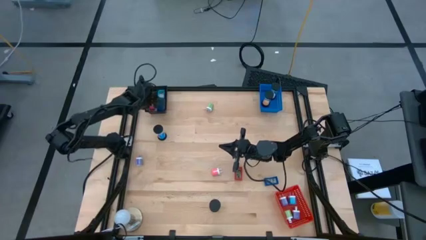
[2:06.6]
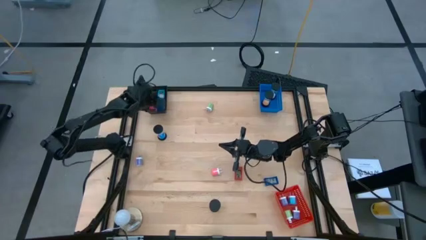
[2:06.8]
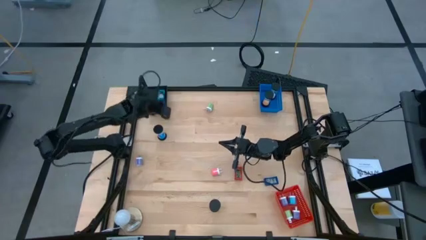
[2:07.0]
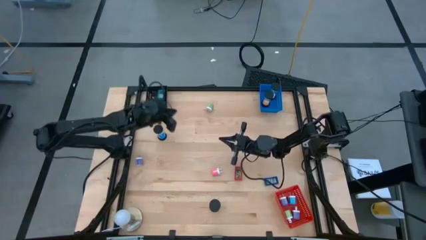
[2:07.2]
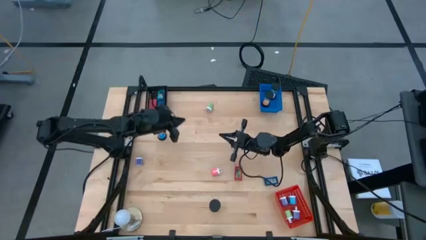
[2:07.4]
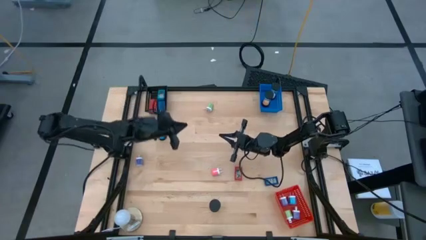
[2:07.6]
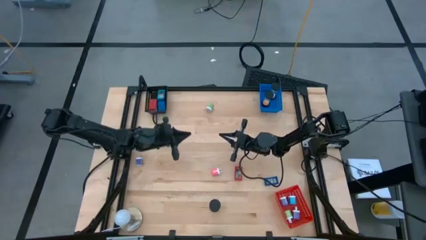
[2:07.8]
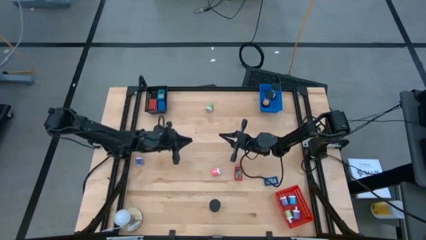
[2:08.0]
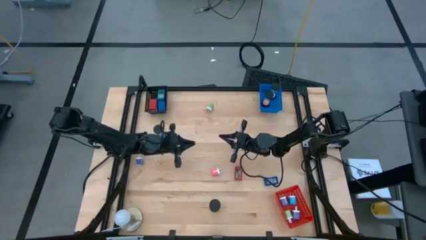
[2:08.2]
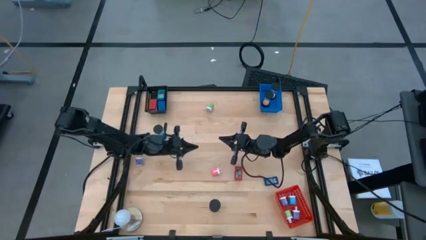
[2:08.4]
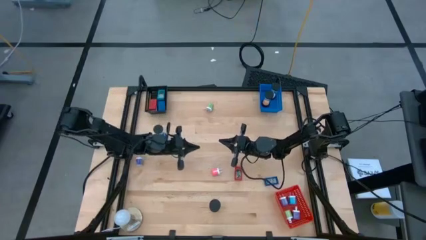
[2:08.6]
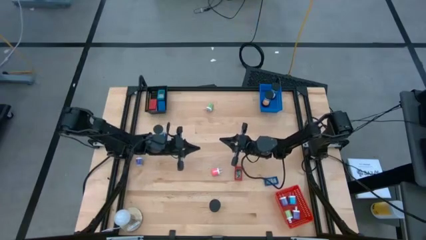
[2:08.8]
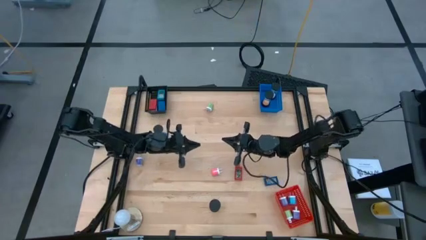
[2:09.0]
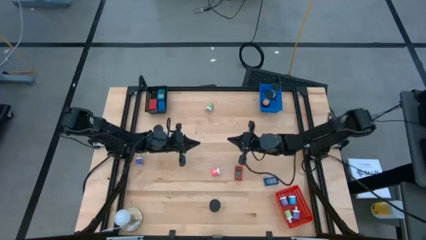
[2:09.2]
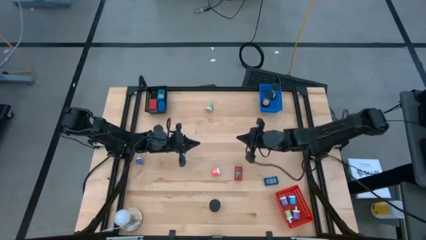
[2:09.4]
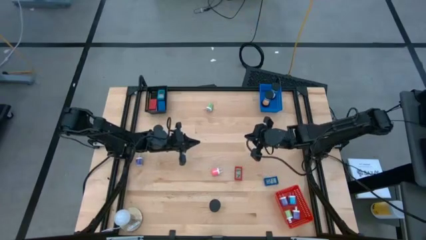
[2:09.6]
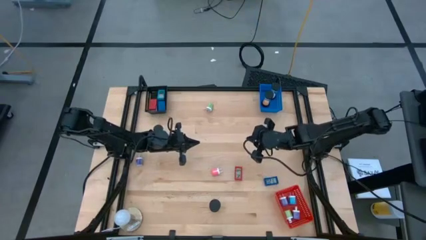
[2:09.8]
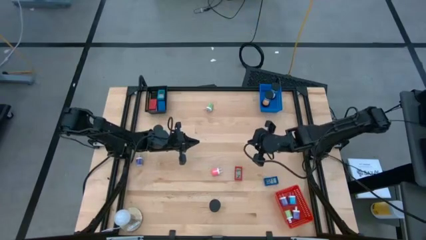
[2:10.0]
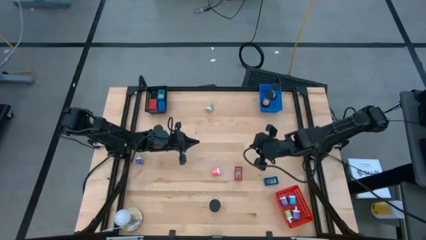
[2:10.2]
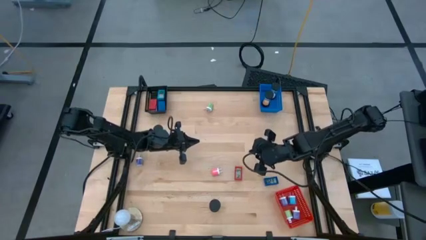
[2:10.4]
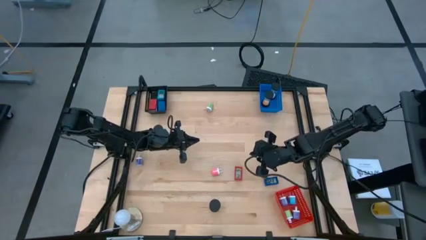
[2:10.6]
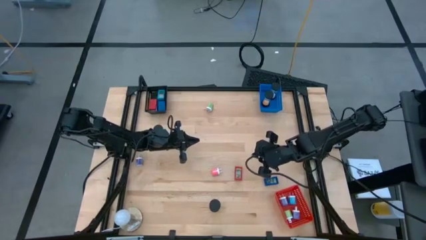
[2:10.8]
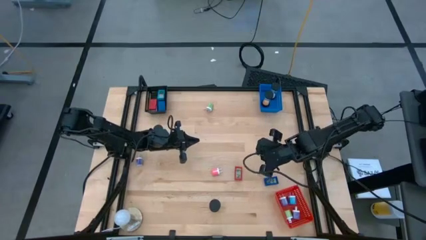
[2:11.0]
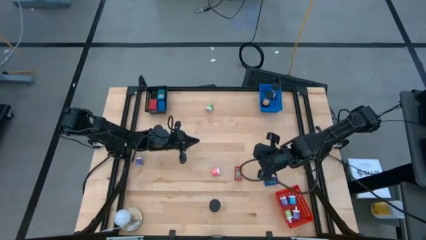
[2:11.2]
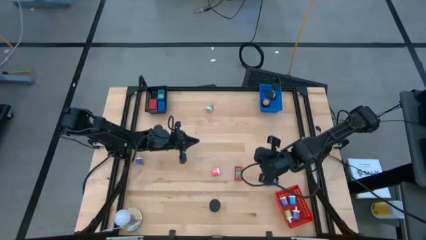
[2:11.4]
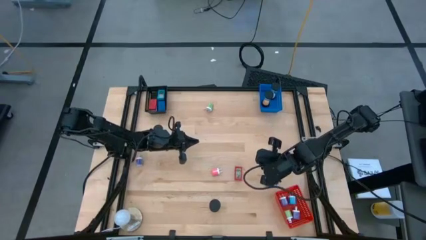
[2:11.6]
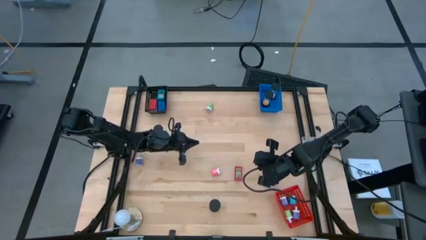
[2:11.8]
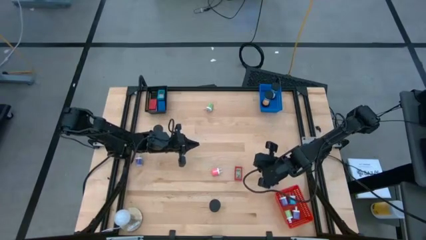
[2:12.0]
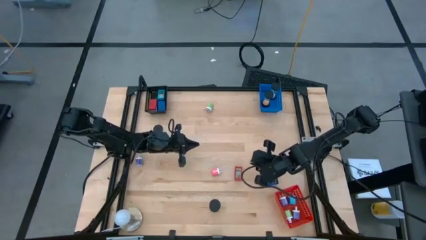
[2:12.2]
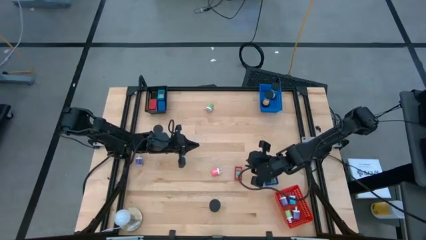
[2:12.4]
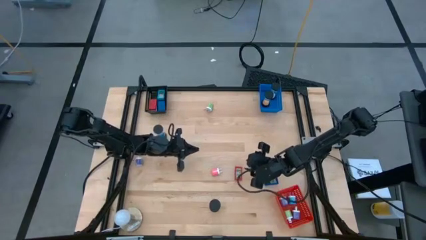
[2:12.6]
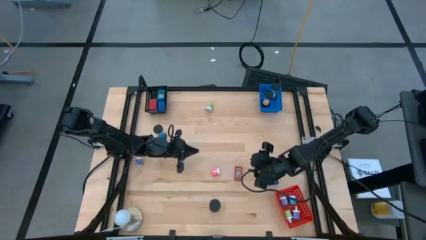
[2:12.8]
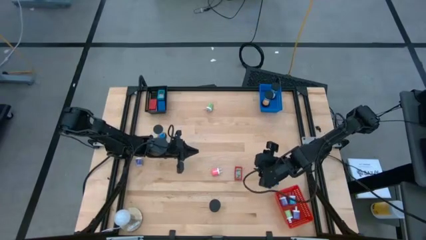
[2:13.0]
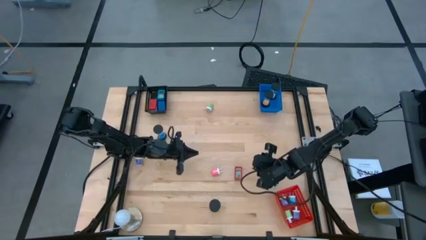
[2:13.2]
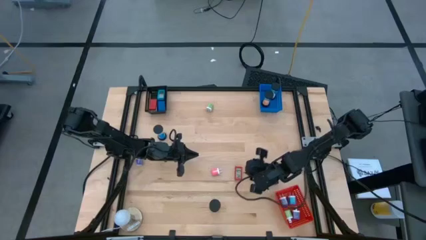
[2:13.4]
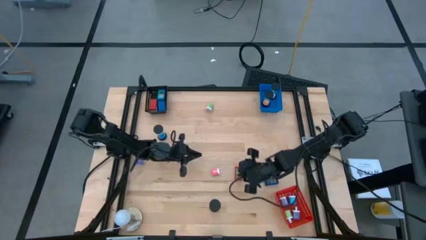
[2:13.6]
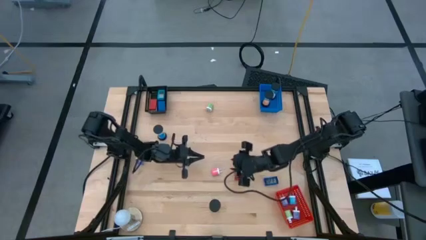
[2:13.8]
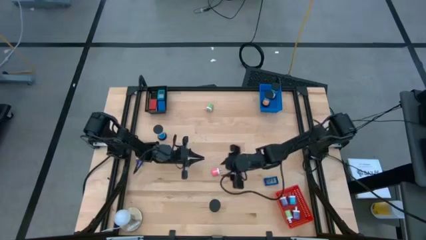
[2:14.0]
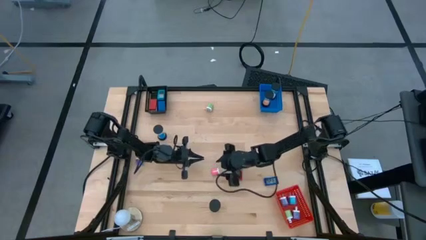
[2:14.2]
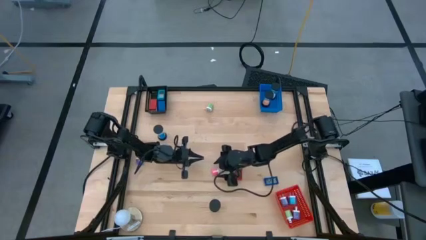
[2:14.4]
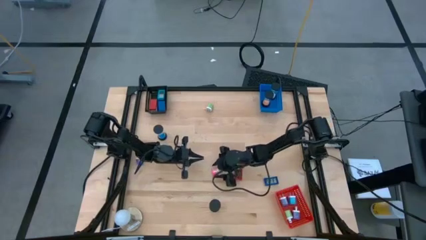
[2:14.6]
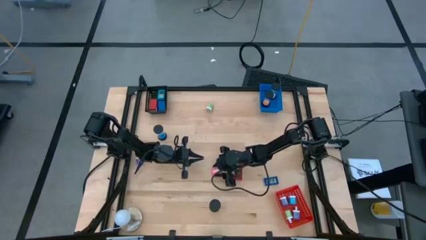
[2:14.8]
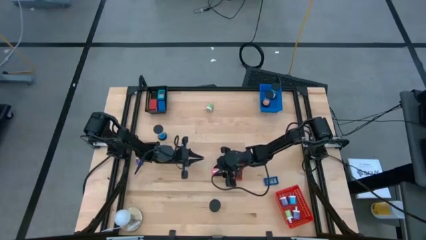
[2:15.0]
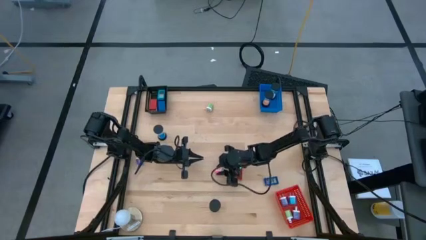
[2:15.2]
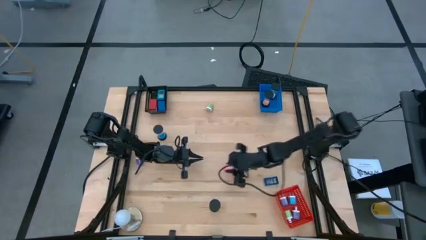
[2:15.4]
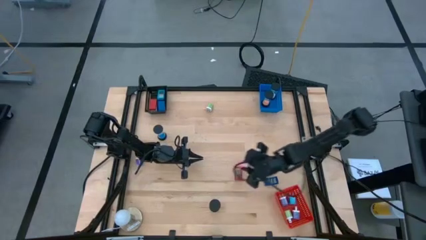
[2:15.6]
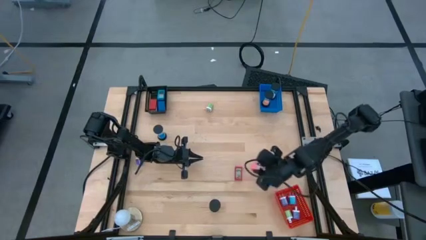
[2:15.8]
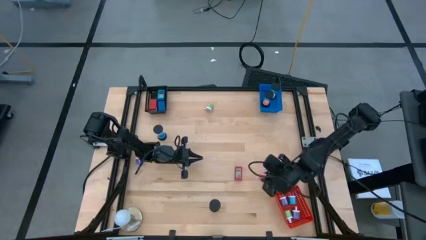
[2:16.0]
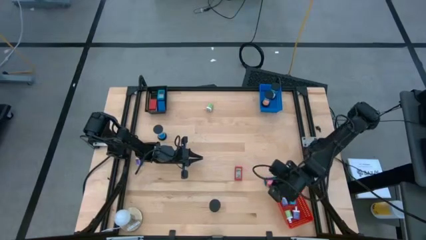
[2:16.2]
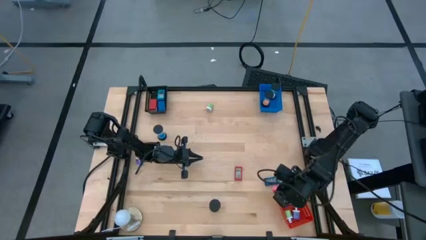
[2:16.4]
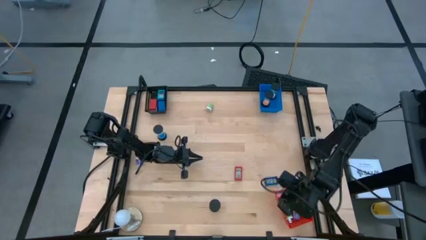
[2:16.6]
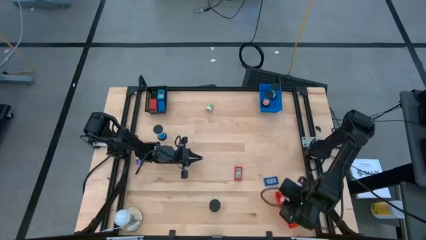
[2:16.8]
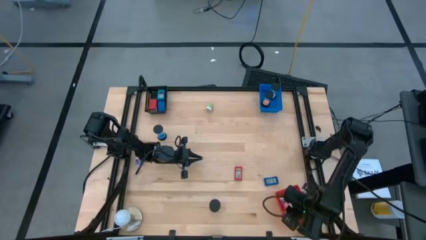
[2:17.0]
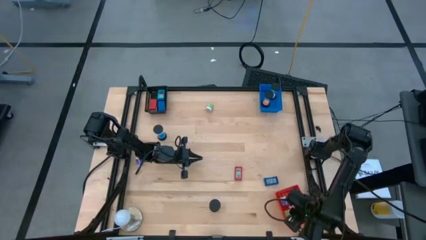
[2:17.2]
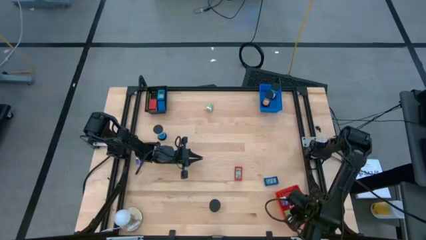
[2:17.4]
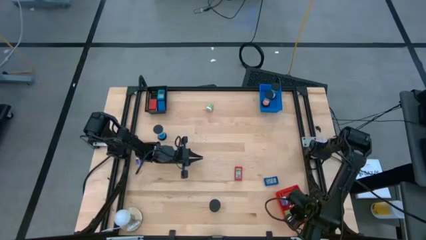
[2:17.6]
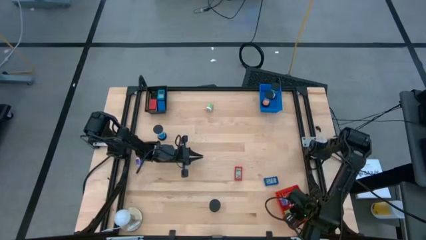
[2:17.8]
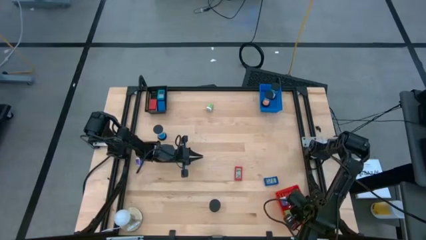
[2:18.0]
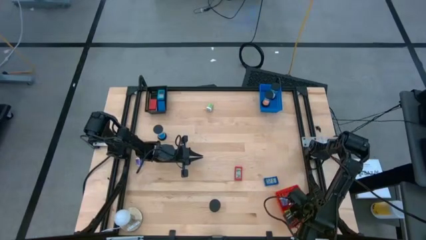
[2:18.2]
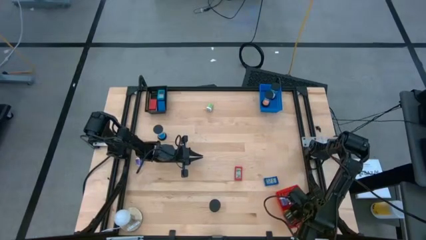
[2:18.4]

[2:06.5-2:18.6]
Task: Pick & Place Office items
Put the pink charger adapter into the red basket

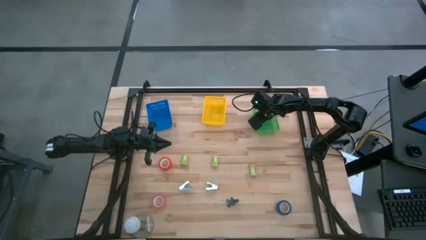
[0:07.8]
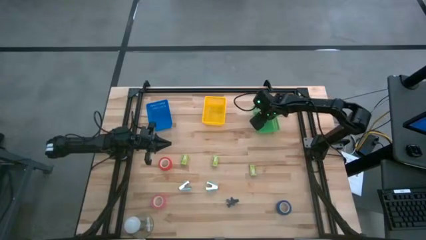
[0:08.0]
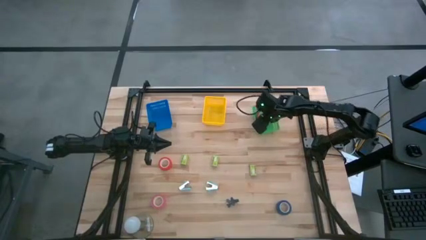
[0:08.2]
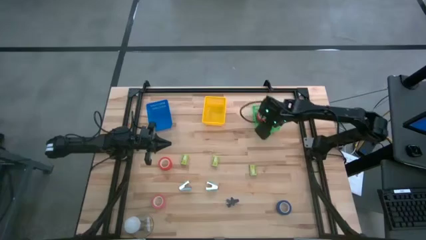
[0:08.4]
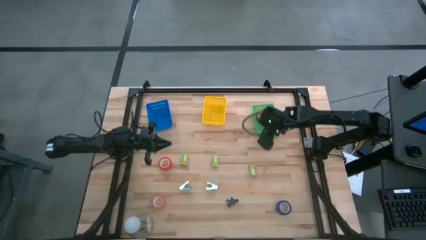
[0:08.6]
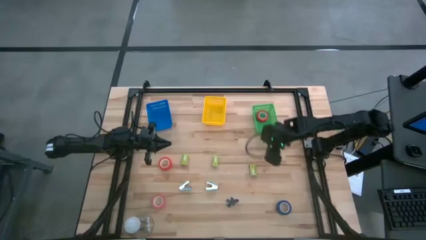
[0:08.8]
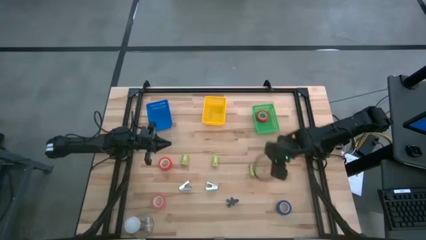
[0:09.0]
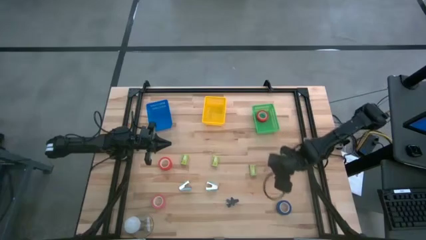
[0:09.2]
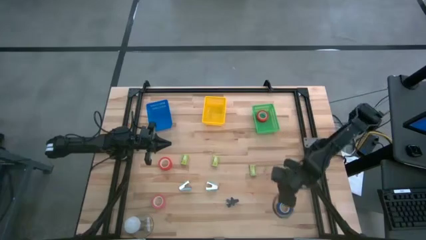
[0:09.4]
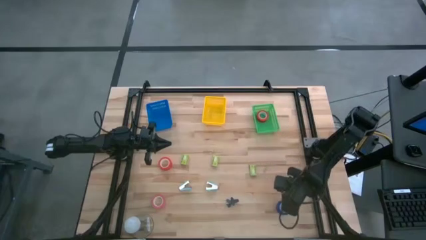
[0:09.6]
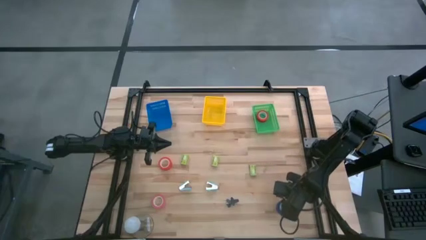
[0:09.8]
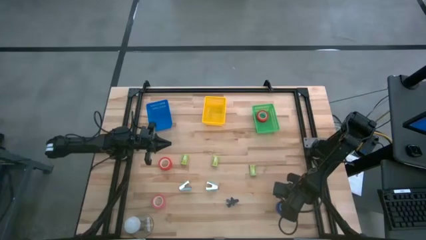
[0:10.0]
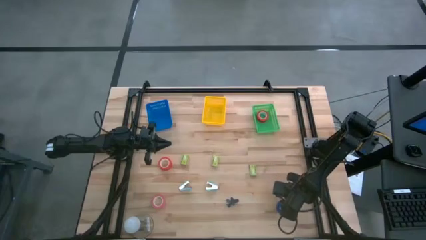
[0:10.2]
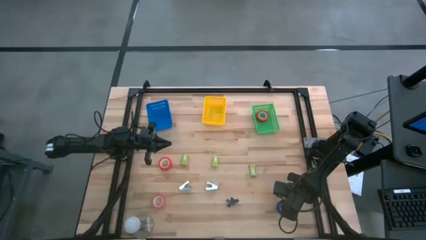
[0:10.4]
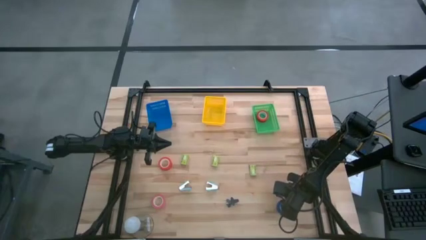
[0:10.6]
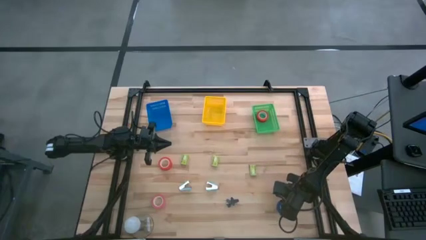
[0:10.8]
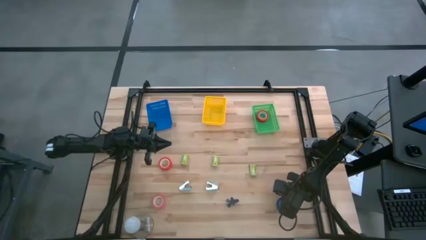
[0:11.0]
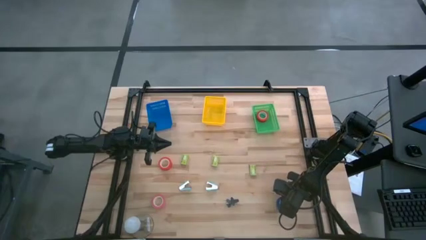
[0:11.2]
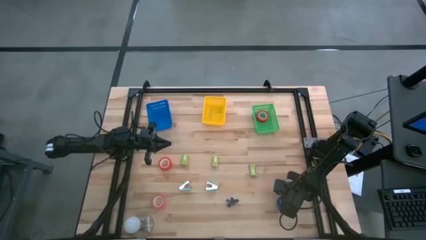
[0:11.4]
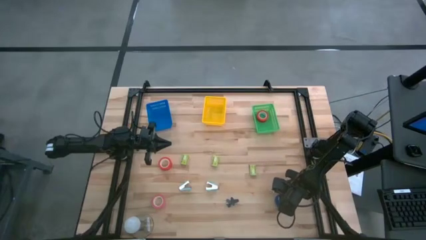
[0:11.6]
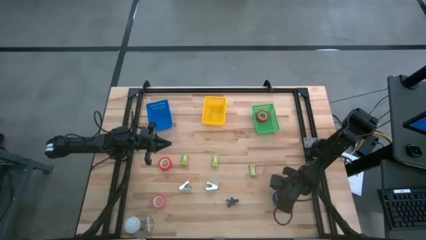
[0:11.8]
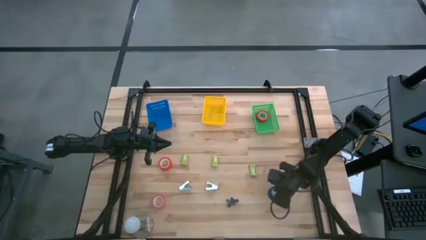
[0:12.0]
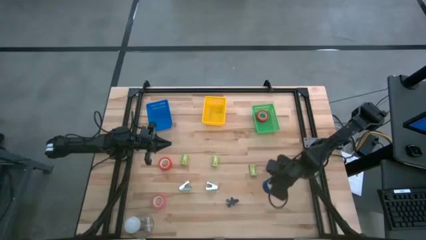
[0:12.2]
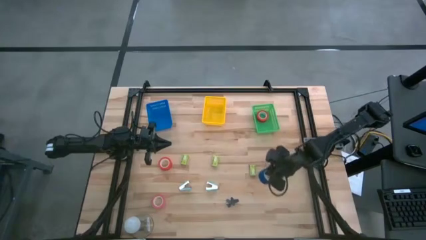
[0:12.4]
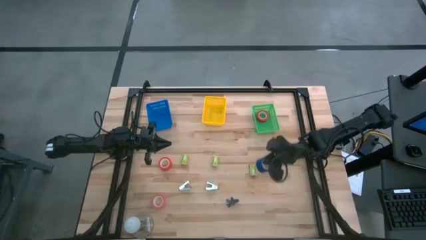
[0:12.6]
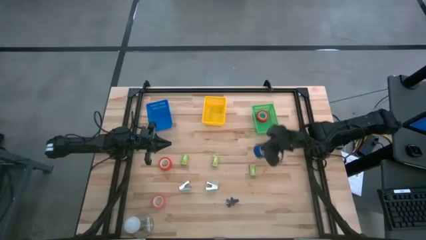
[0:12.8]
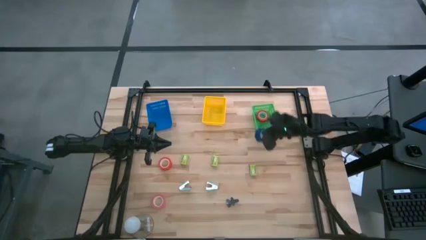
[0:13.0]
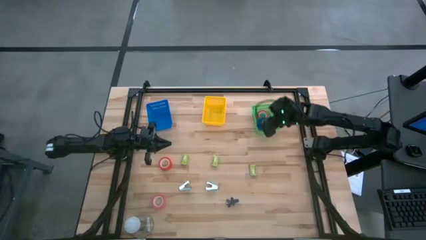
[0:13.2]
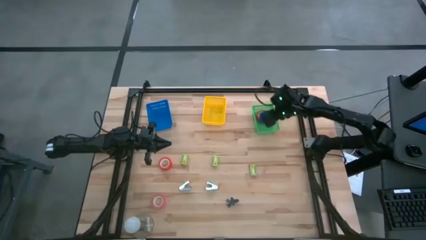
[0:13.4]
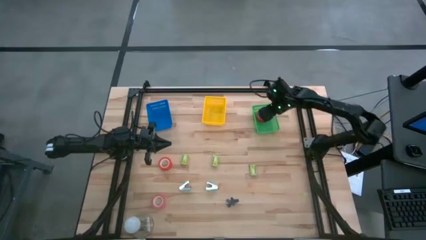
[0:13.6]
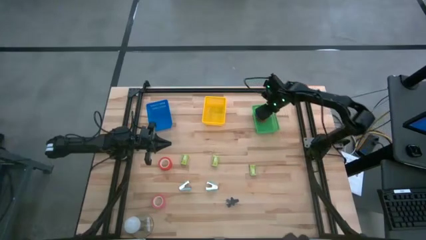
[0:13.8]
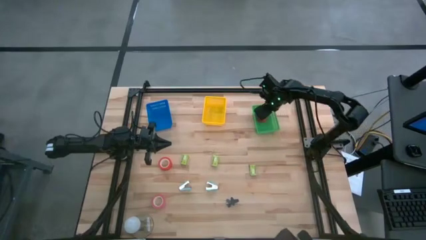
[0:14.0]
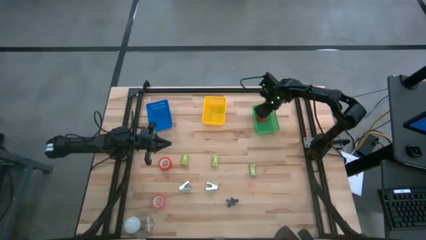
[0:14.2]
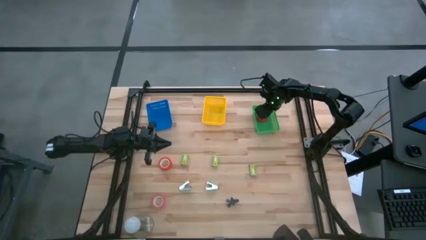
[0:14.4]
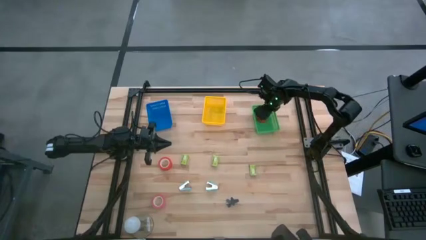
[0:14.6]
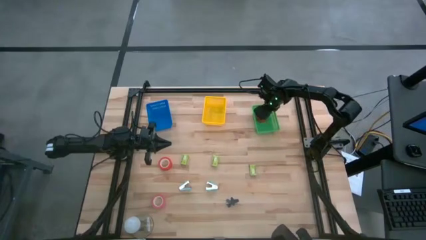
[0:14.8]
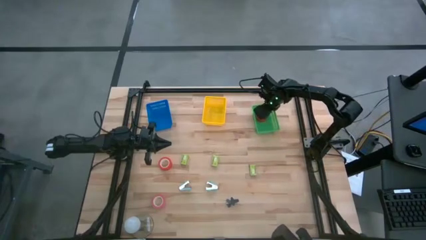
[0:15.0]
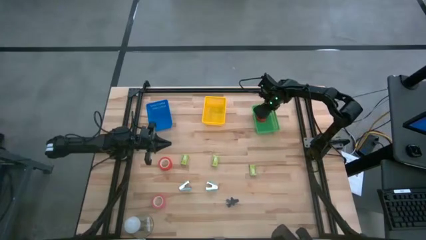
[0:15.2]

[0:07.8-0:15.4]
Task: Pick and place Stapler, Stapler remover, tape
Put the blue tape into the green bin
